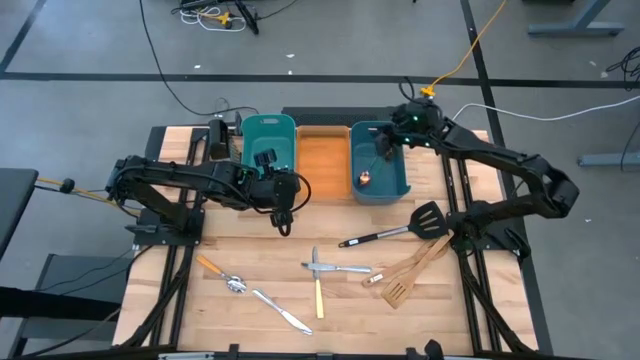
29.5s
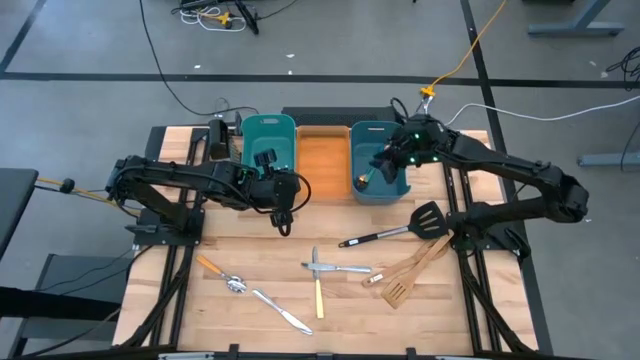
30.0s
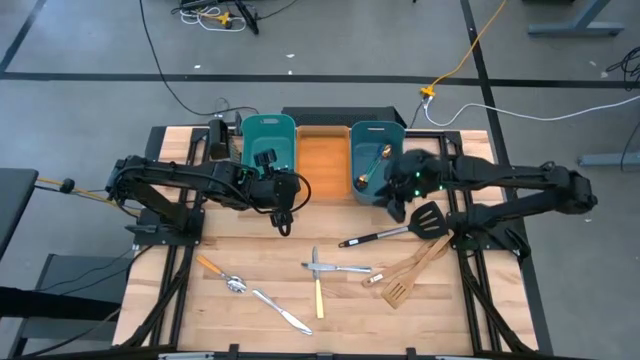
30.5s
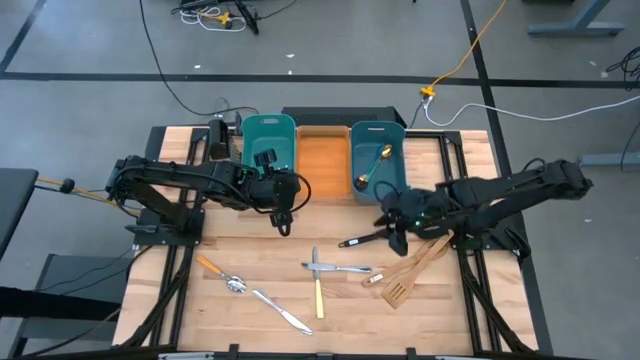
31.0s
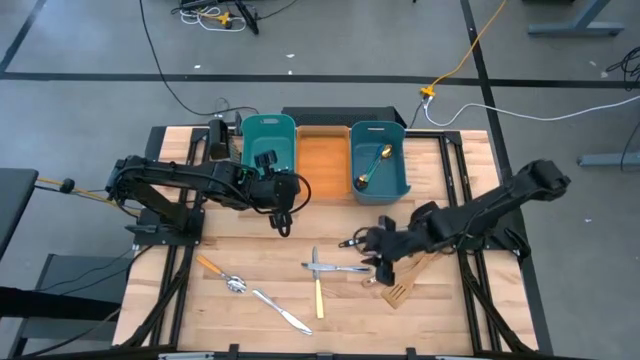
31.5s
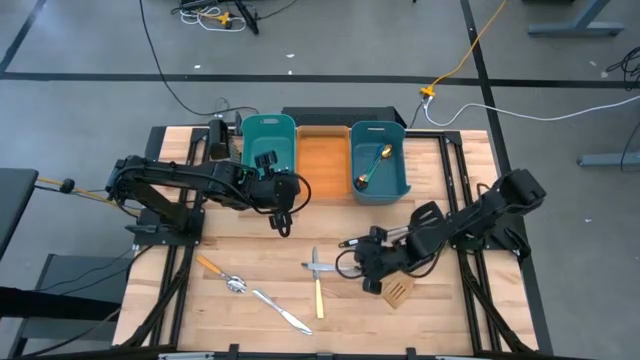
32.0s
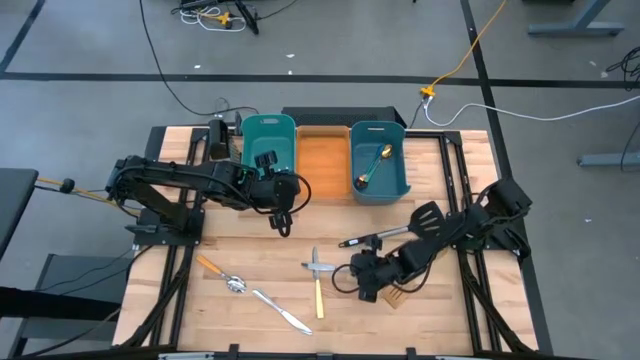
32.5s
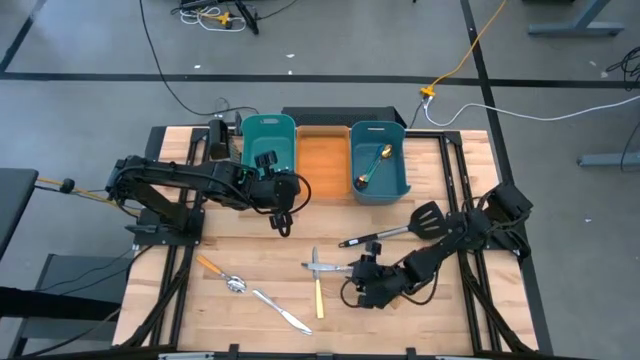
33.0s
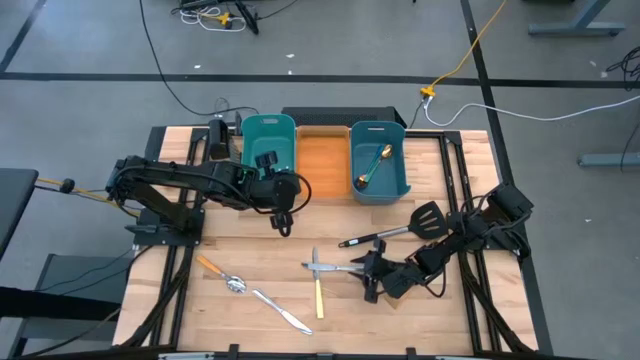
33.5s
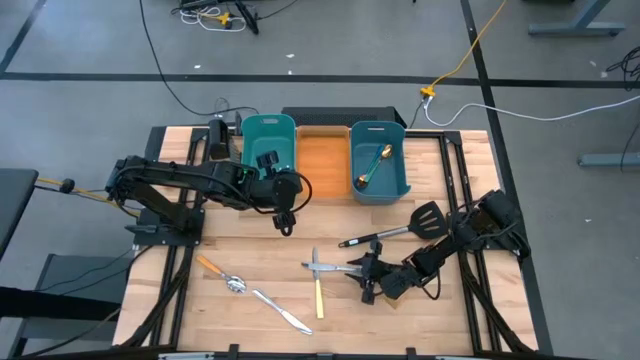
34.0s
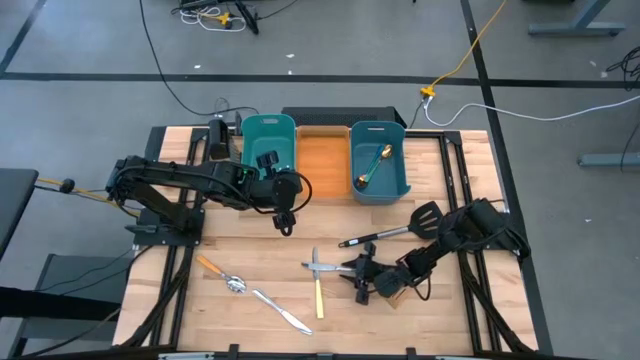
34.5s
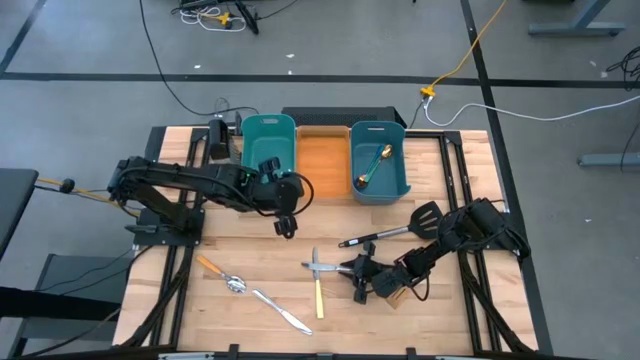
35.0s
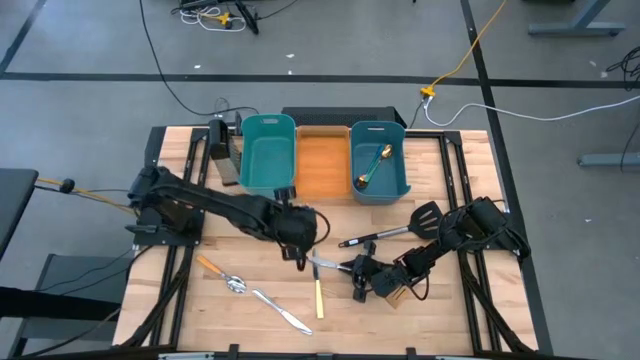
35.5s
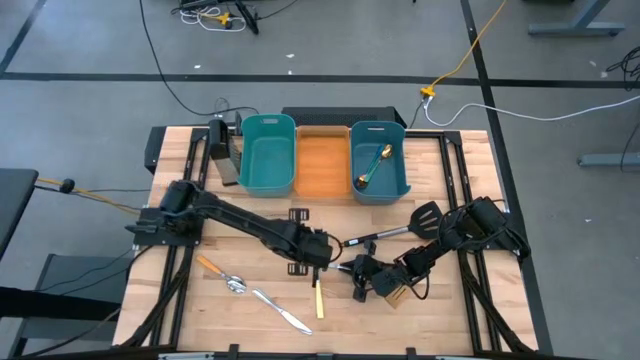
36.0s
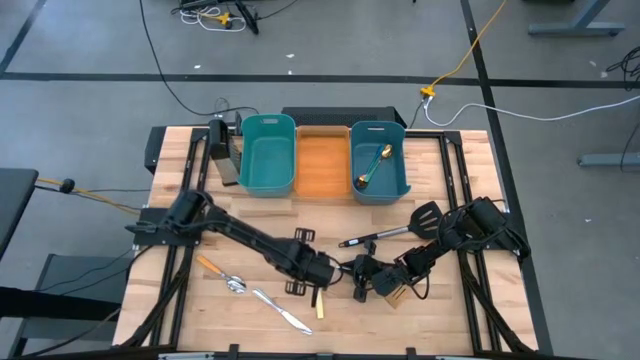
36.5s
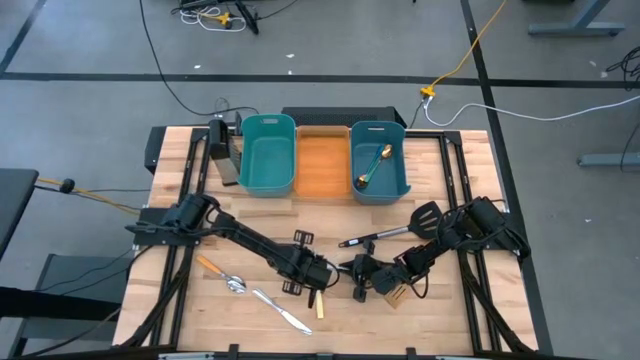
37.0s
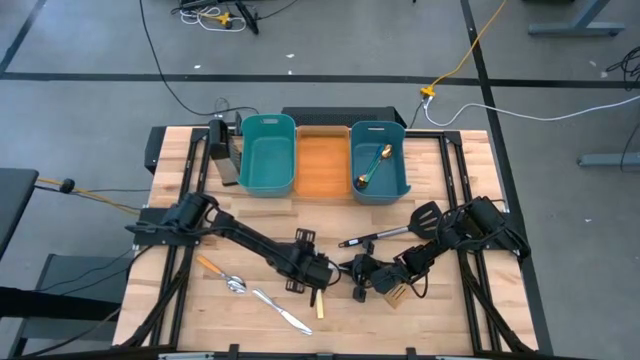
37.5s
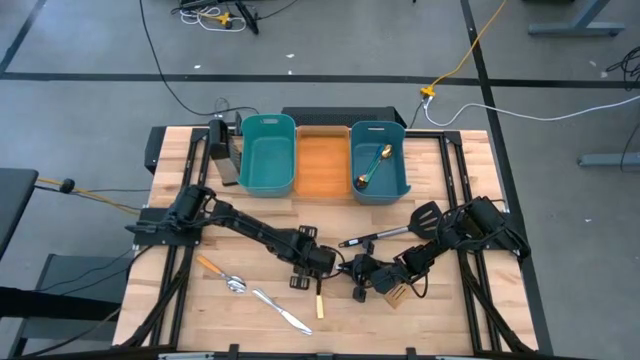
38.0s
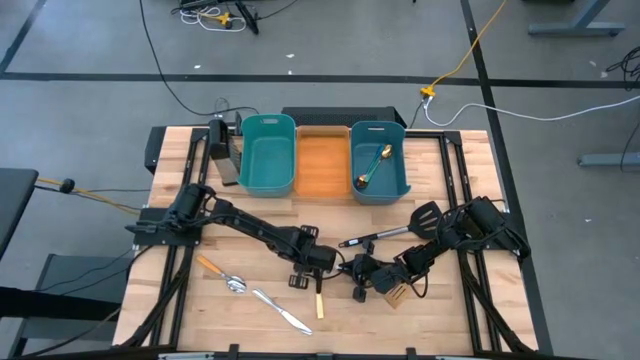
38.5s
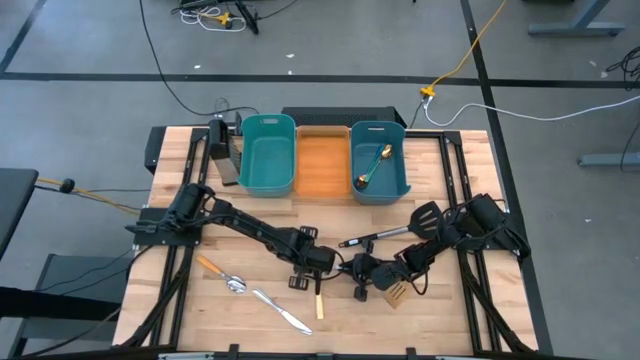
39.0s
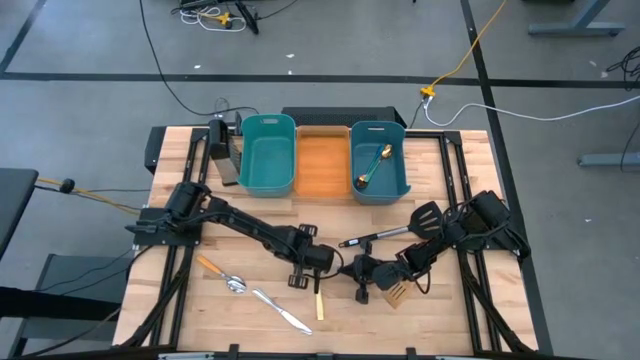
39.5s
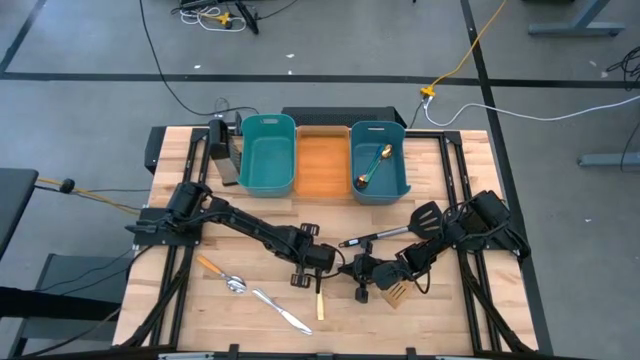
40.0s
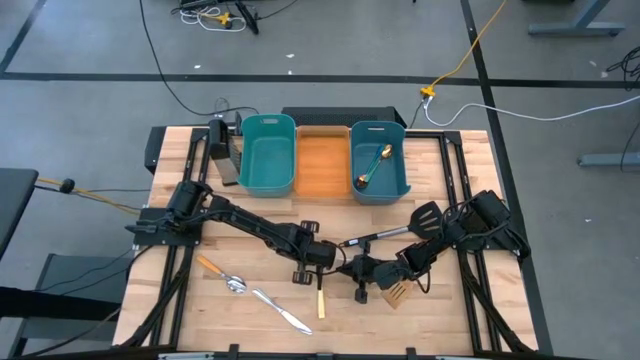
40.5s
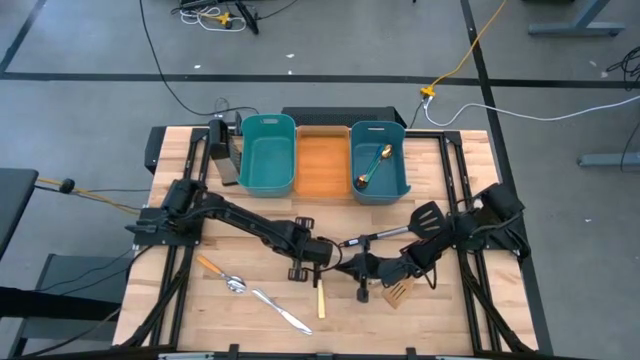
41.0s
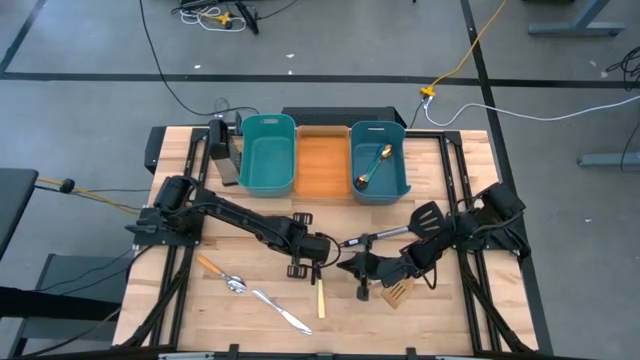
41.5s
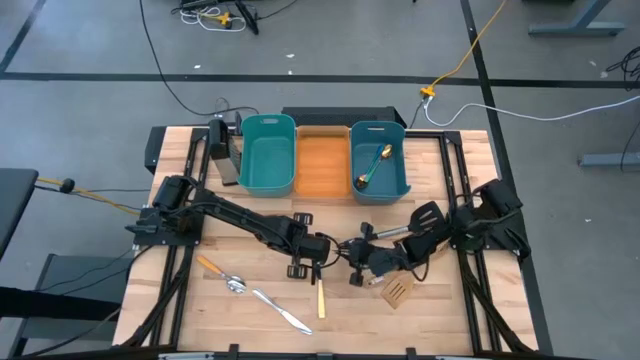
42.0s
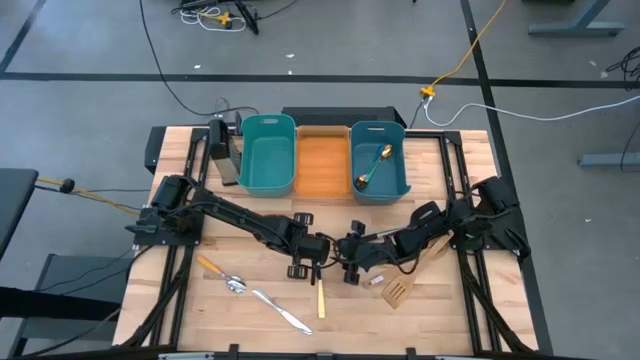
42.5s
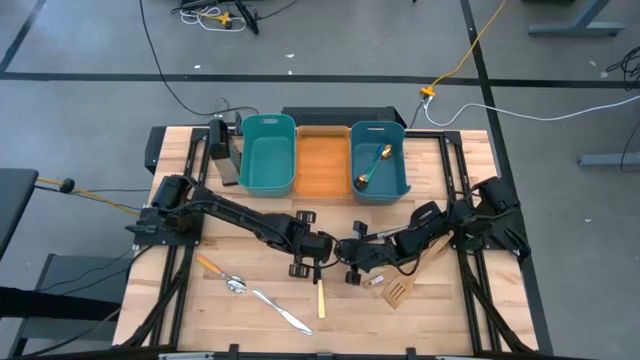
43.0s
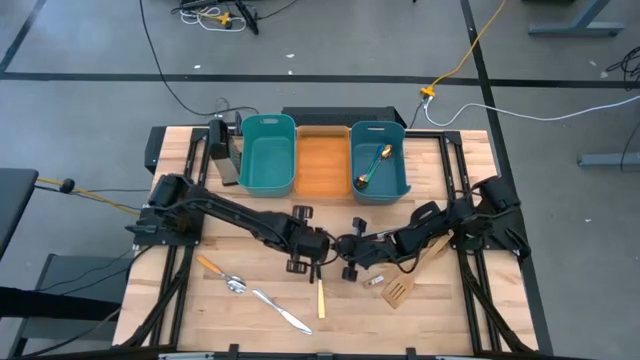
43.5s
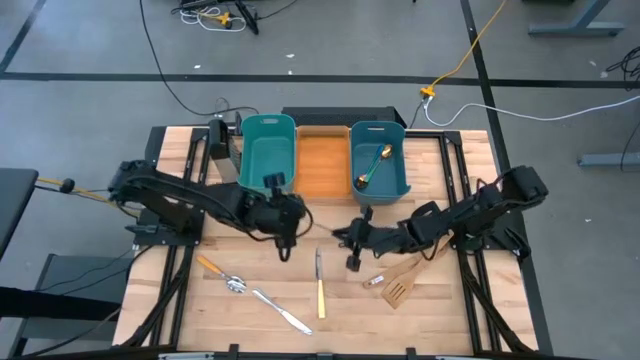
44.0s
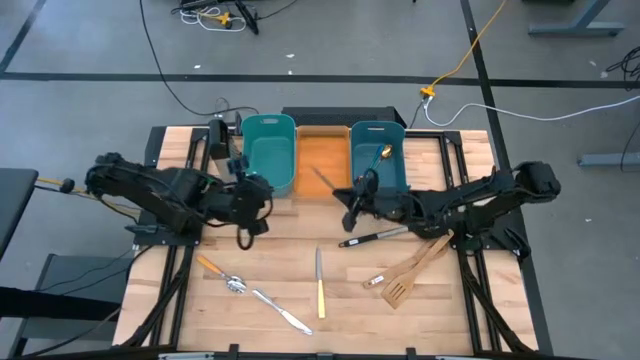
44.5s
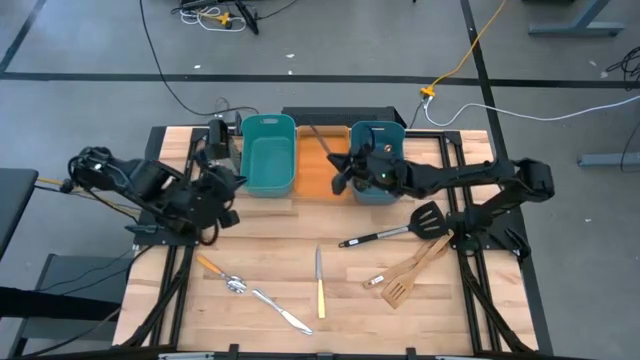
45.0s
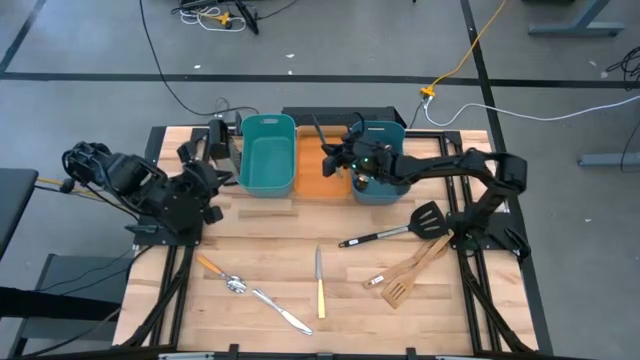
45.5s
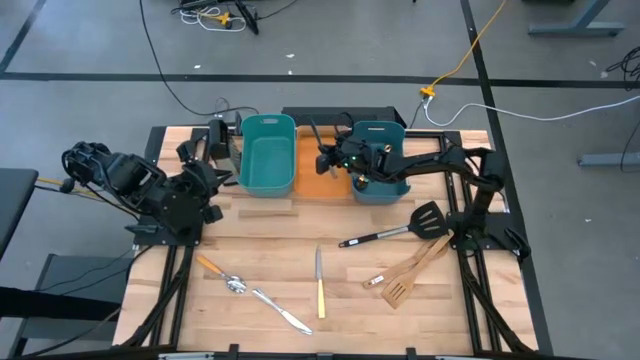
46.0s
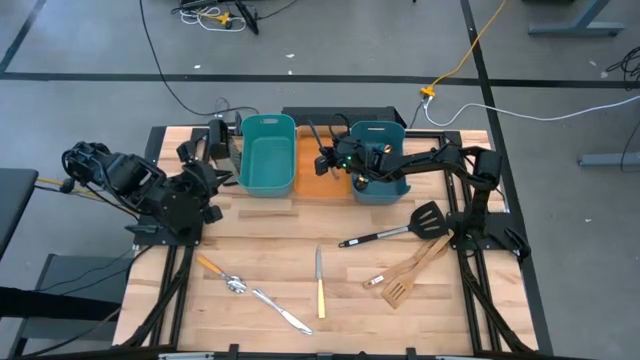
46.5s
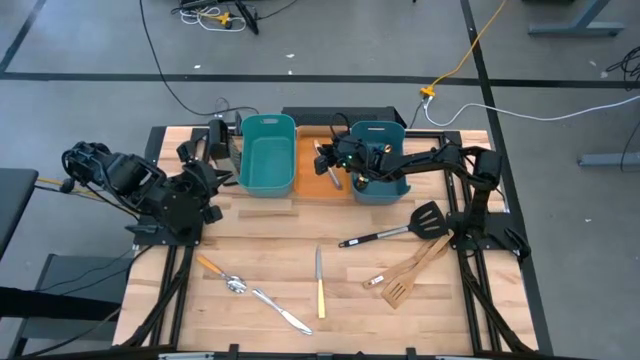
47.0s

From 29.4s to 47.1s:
Task: Pick & Place Kitchen Items
Put the top silver knife into the orange bin
